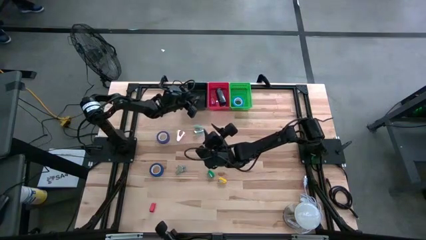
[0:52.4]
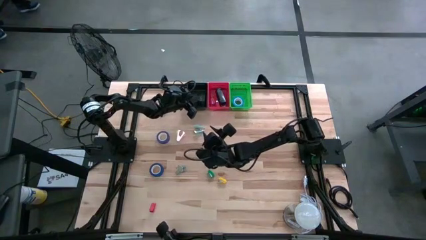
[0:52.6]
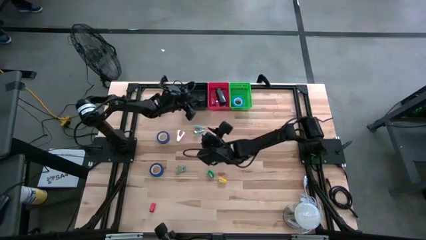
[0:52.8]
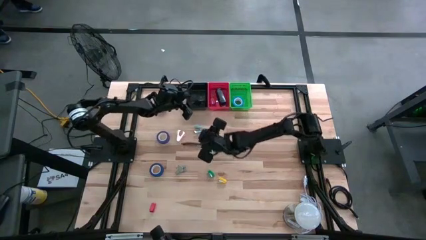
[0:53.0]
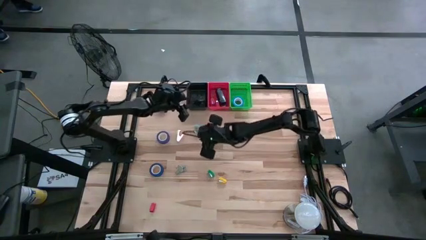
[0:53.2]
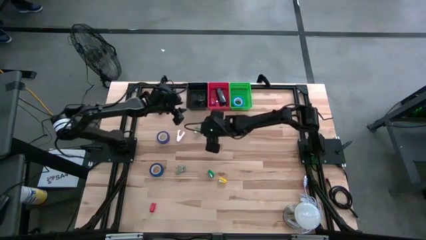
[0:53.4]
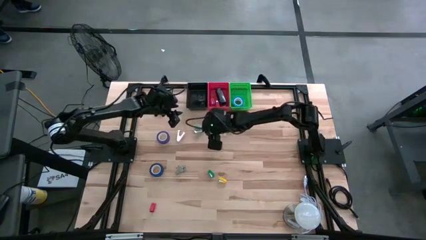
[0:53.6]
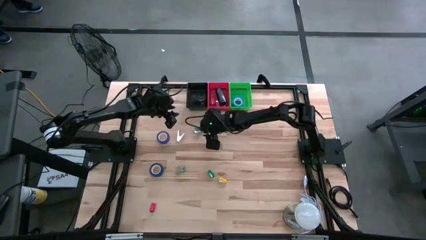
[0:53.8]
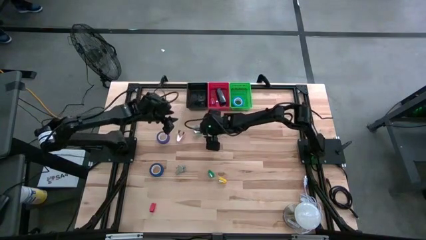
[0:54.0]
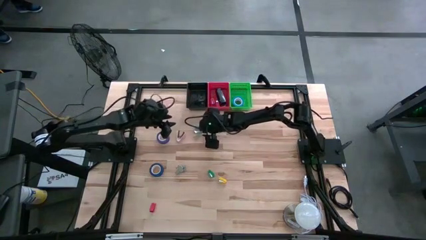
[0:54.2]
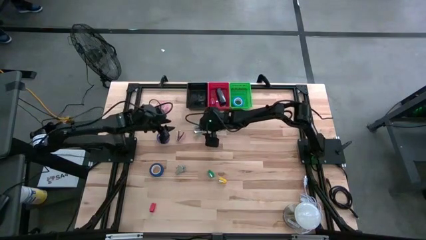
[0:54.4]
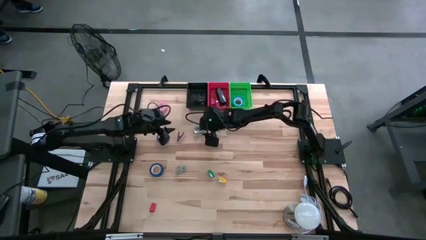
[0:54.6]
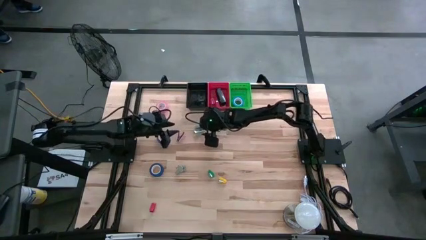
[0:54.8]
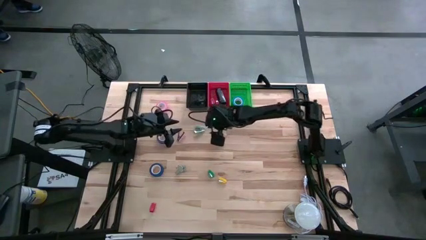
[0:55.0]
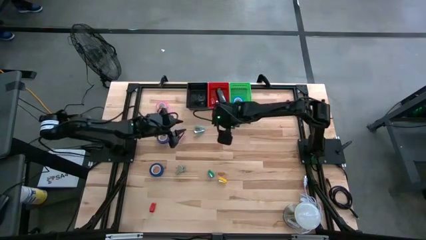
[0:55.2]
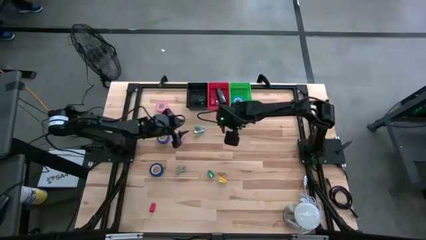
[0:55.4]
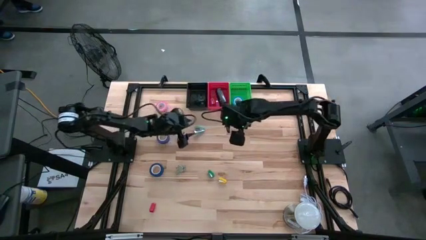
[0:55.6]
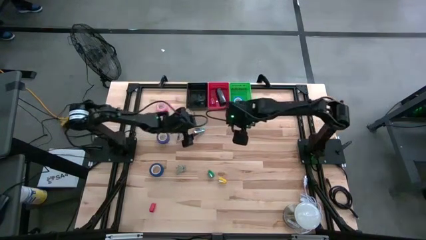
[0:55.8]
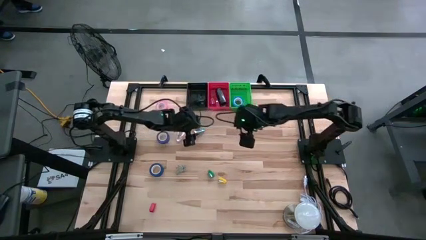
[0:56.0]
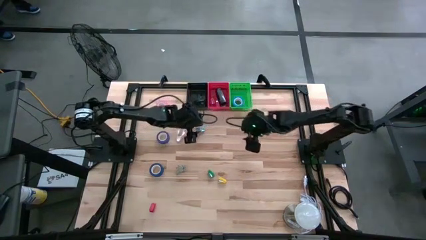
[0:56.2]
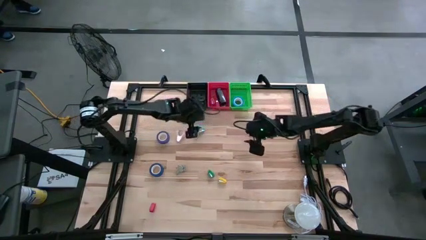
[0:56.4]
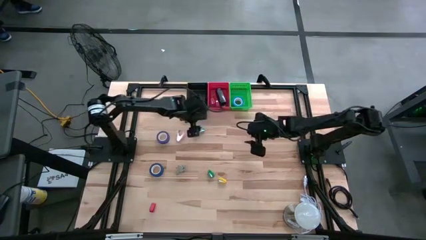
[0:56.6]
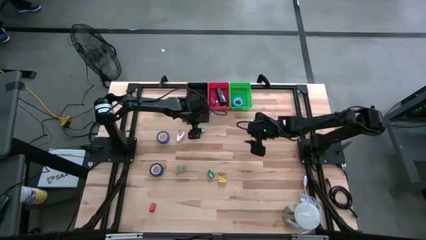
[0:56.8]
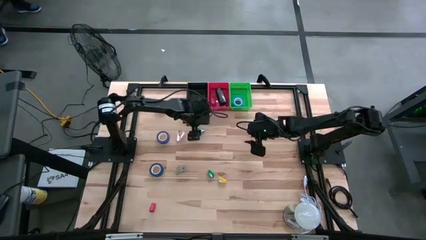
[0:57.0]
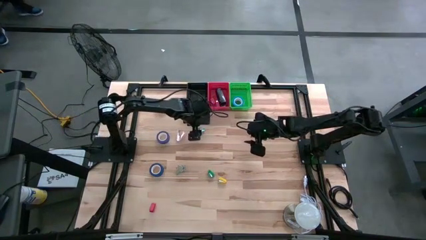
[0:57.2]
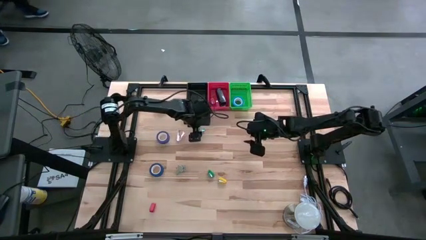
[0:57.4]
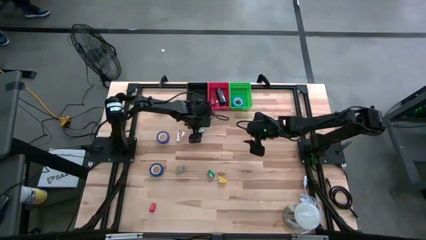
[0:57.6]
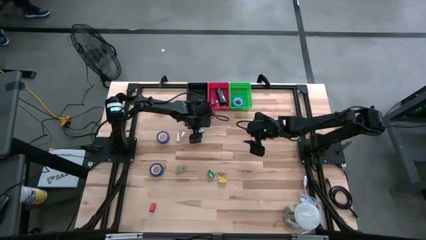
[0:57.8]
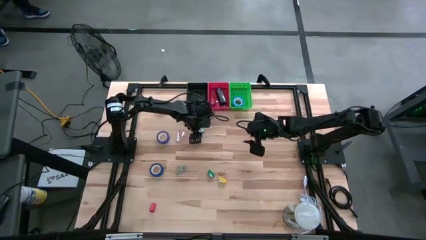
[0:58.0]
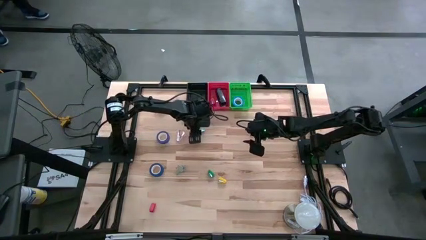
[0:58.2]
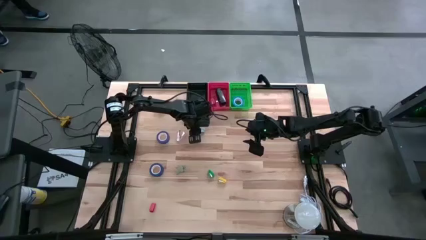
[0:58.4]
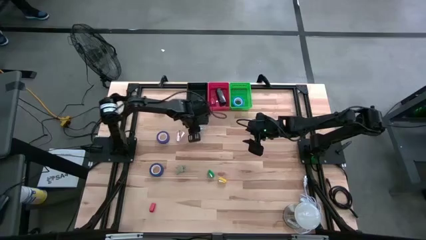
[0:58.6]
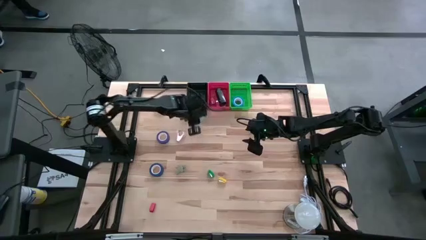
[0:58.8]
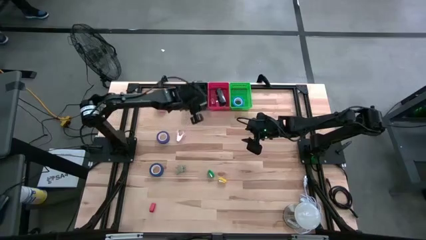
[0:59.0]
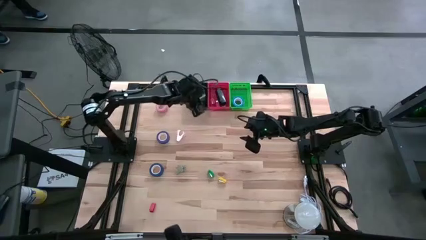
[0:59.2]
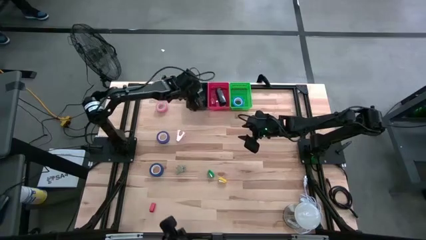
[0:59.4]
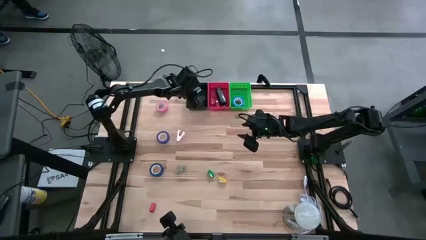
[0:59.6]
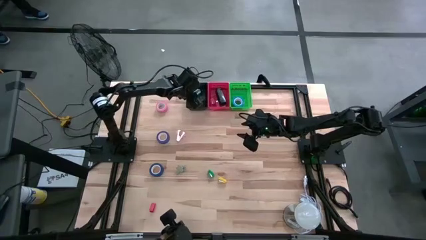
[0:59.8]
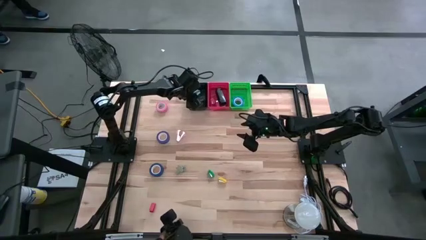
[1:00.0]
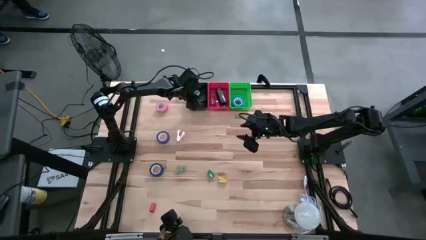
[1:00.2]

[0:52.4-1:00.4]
Task: Pick and place Stapler, Stapler remover, tape
Put the light blue staple remover into the black bin

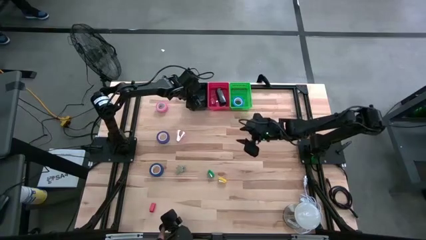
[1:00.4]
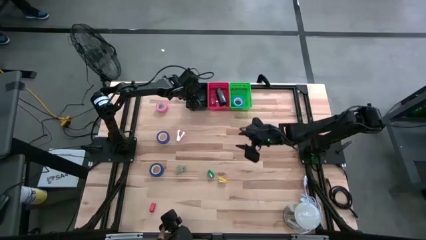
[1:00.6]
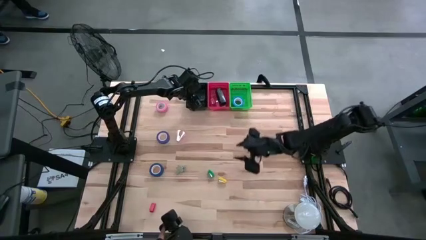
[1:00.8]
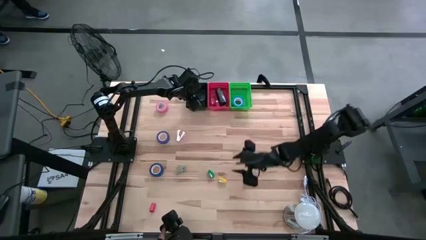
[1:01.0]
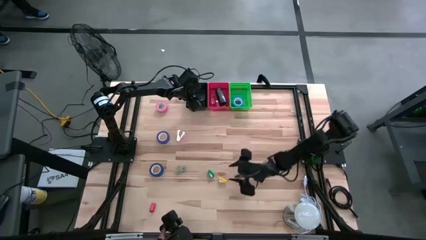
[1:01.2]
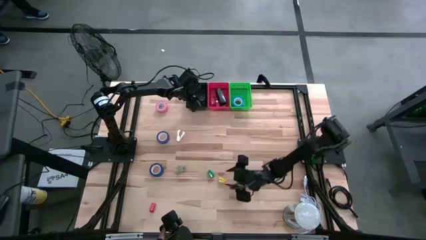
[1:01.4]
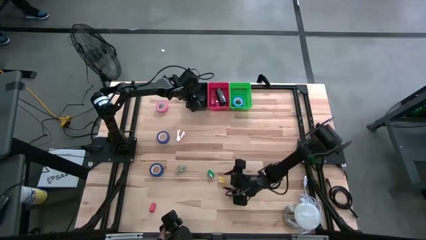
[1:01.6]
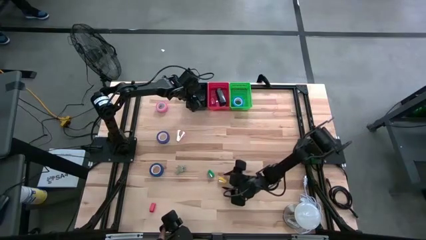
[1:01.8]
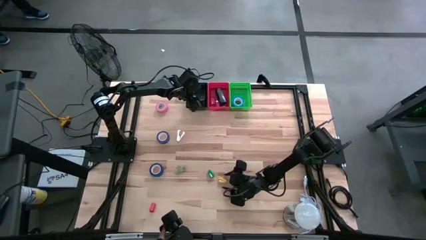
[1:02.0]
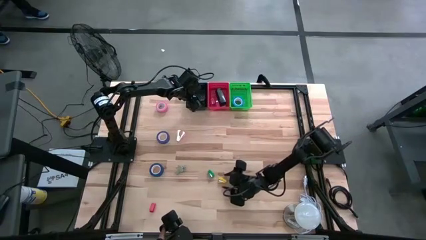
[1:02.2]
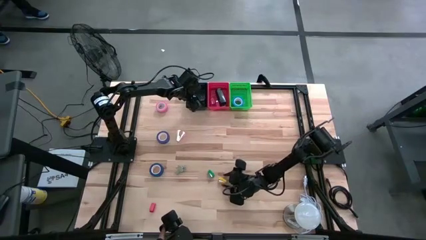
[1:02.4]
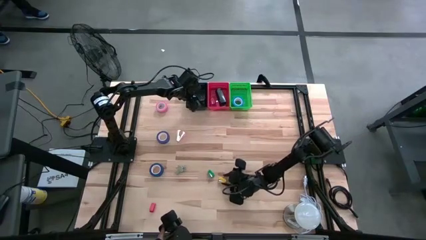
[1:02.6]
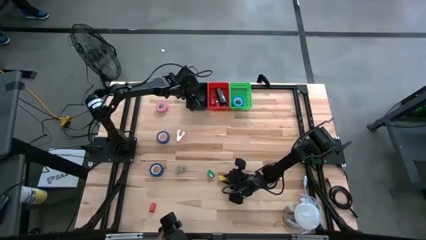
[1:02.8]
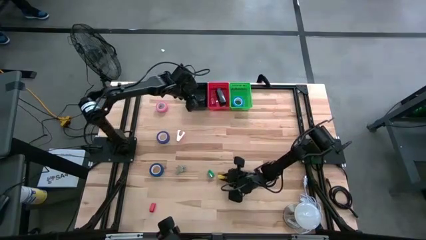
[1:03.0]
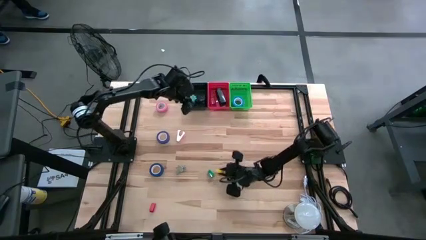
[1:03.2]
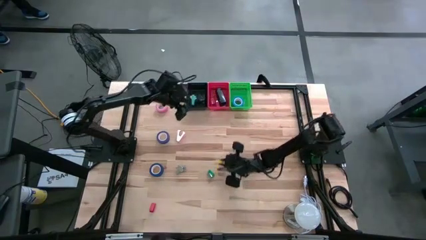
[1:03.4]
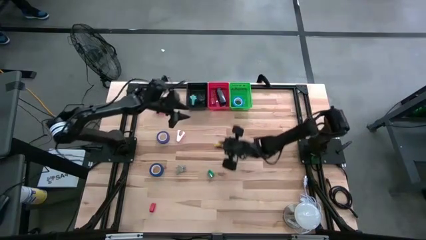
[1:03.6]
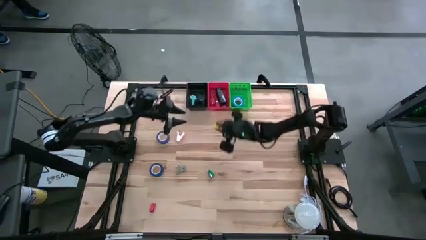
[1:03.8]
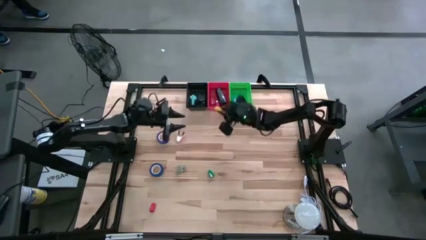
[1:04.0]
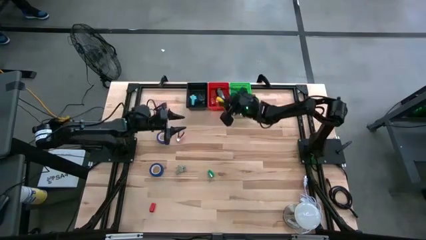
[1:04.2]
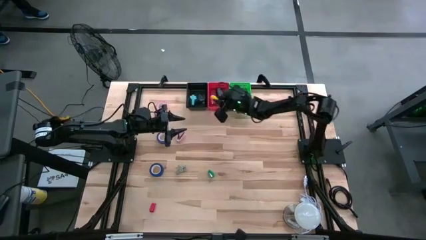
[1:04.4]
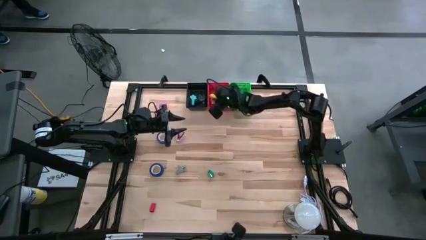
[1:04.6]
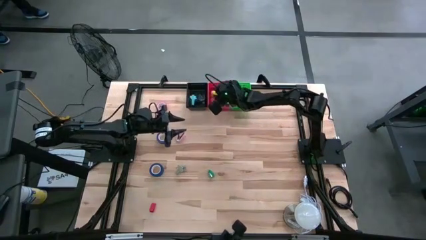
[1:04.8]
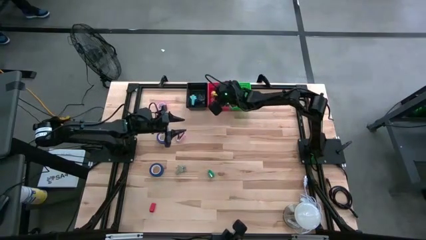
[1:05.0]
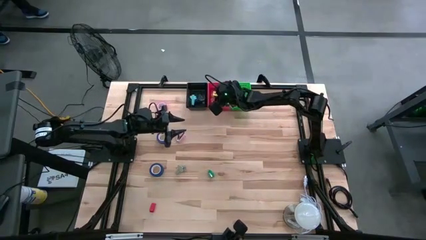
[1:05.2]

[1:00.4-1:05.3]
Put the small yellow stapler into the red bin

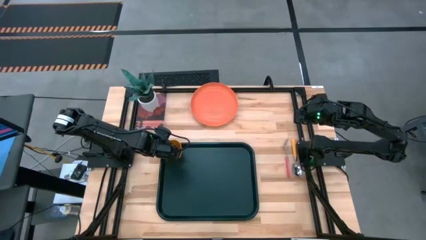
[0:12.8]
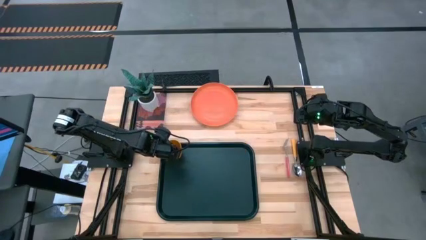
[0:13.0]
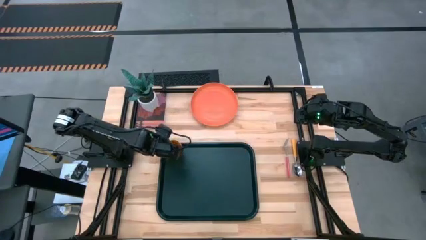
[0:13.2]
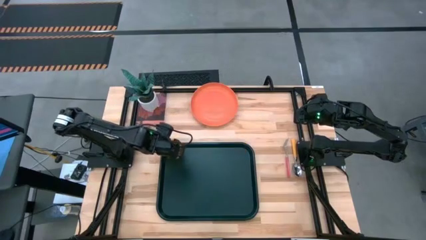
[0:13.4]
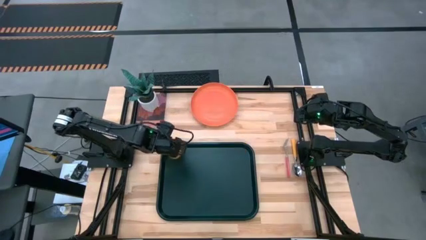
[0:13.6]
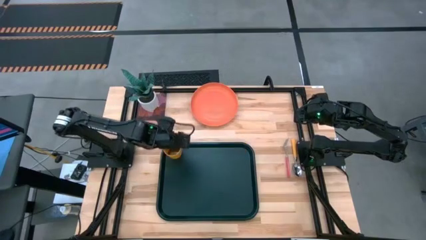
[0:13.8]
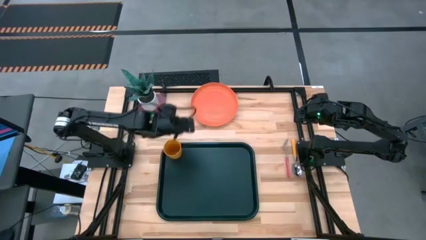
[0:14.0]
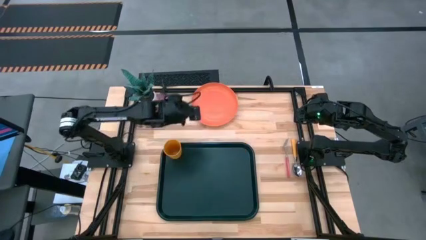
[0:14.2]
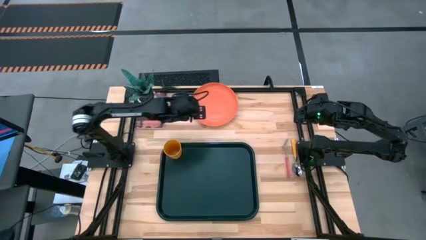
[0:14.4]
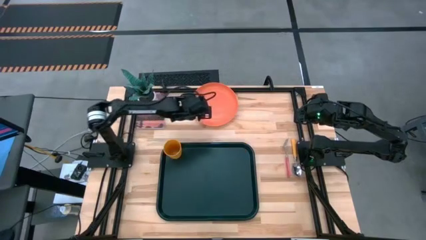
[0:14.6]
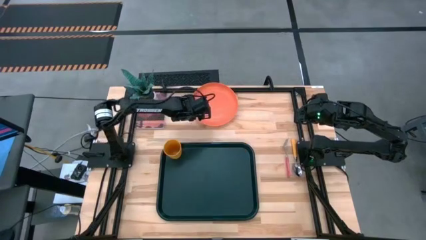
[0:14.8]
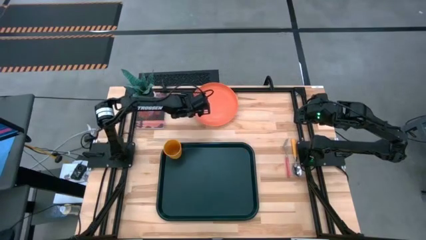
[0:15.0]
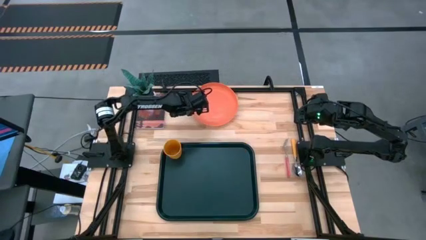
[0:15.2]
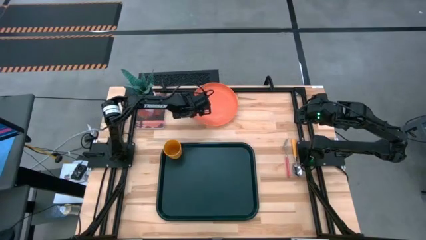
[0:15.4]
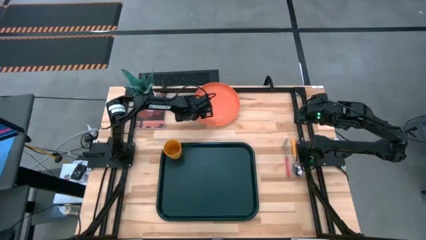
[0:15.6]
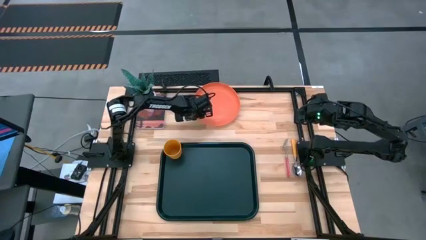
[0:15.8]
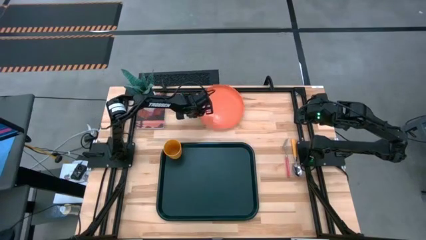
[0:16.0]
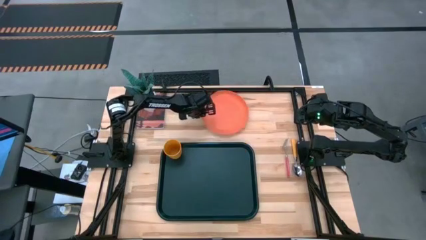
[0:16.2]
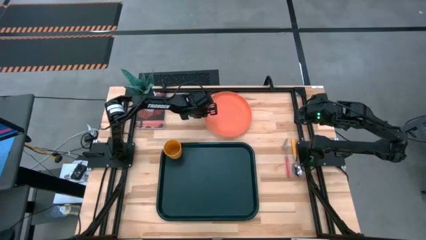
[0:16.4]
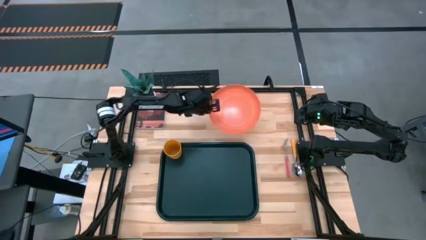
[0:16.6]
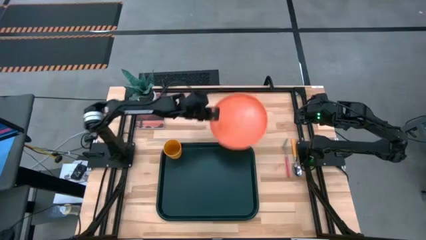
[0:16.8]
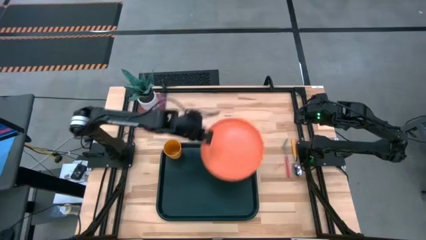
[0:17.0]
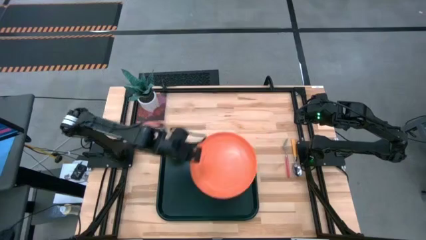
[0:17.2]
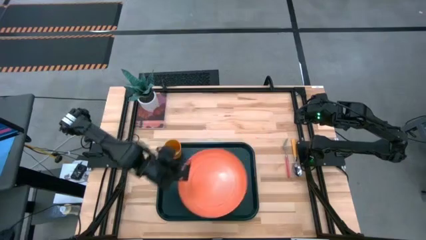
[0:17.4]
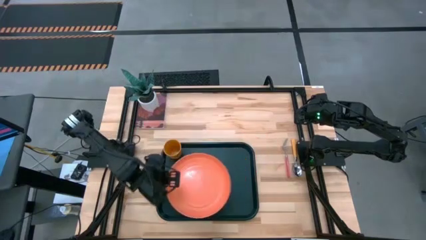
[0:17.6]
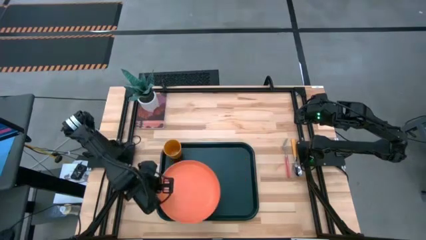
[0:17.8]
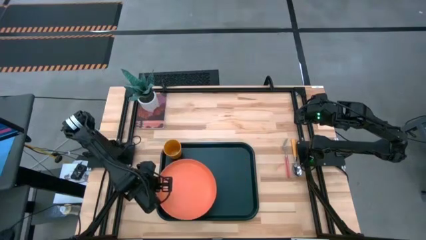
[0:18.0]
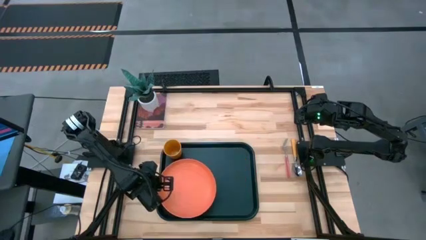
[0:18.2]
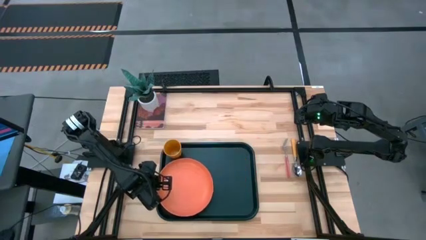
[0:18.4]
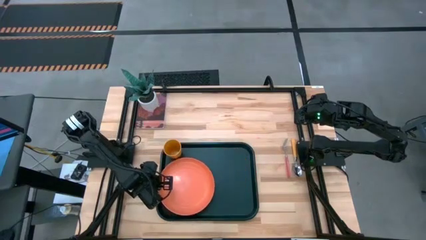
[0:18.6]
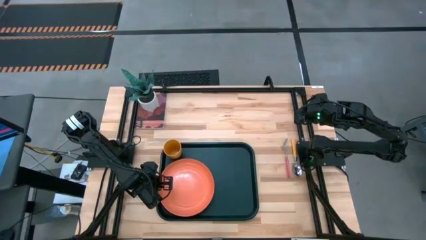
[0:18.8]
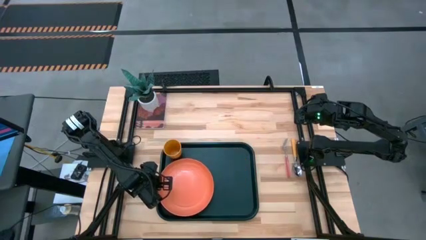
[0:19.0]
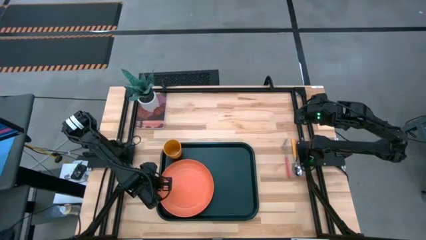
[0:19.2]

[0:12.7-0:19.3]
Task: Pick and place plate/cup/fork/spoon on tray
Put the orange plate on the black serving tray
